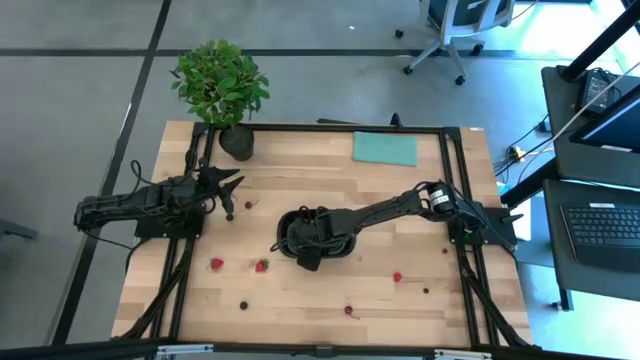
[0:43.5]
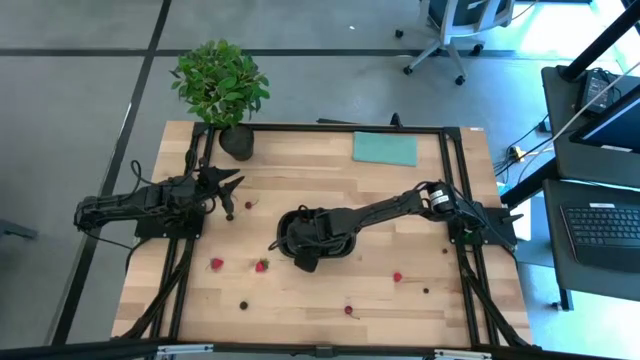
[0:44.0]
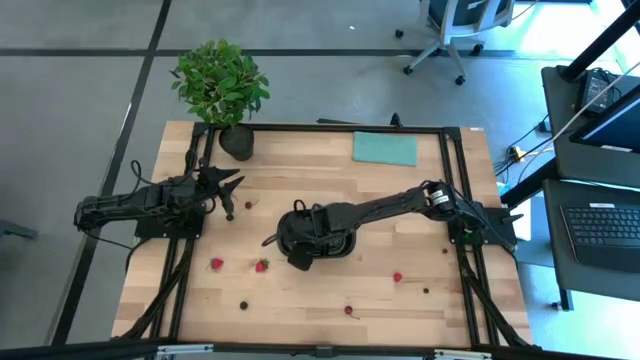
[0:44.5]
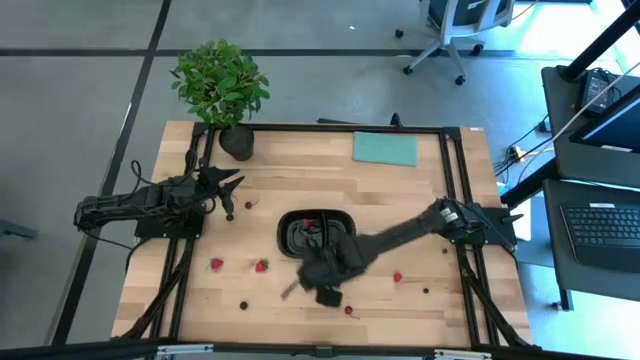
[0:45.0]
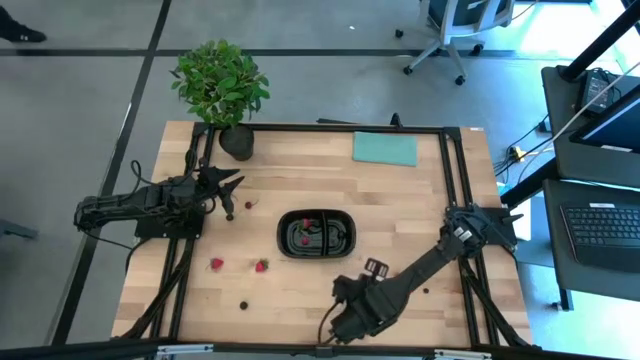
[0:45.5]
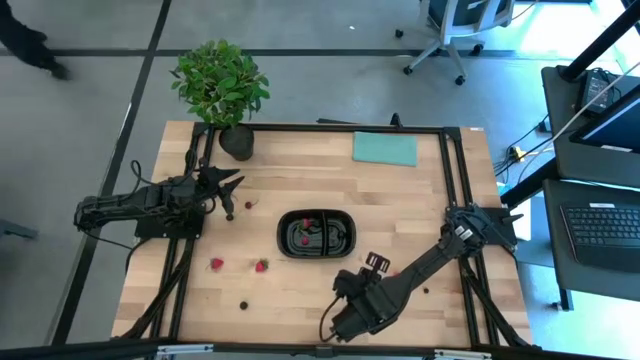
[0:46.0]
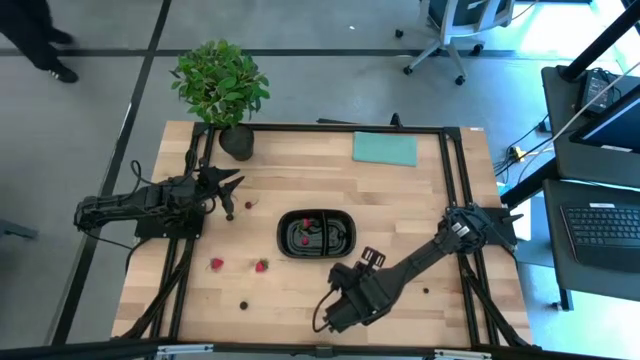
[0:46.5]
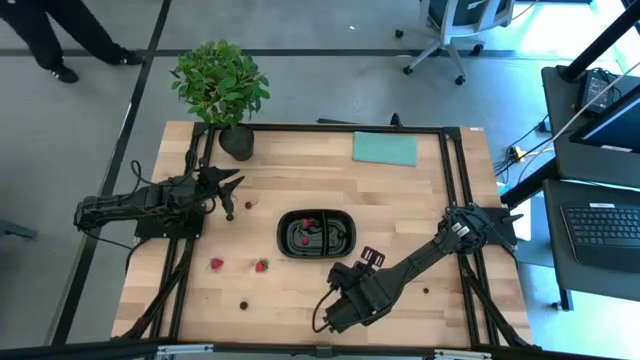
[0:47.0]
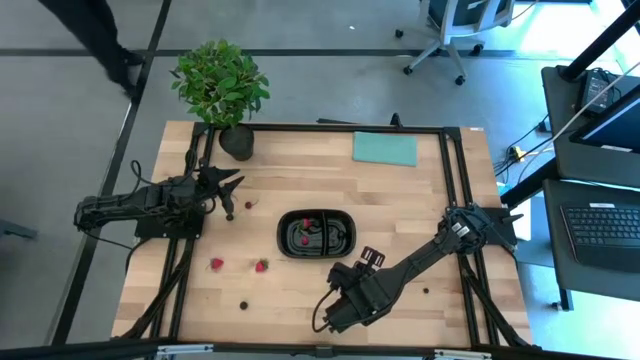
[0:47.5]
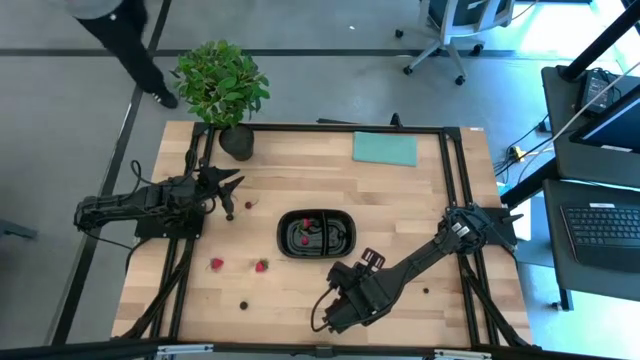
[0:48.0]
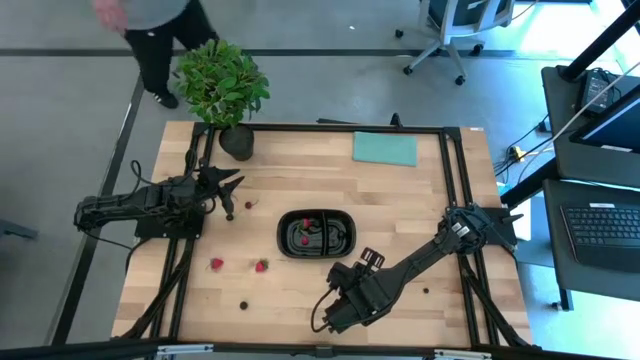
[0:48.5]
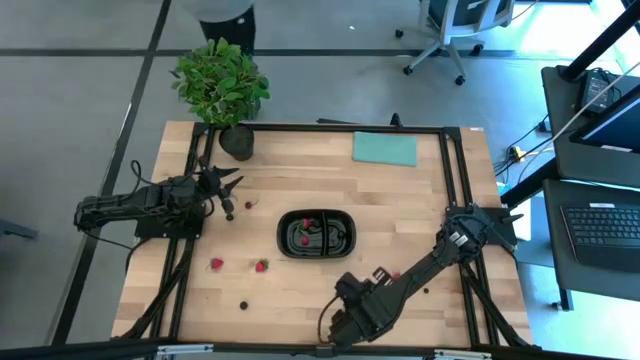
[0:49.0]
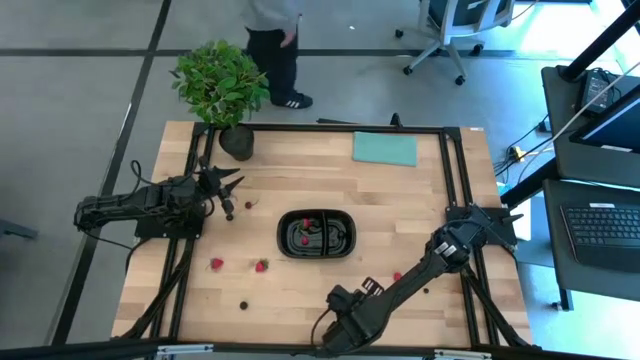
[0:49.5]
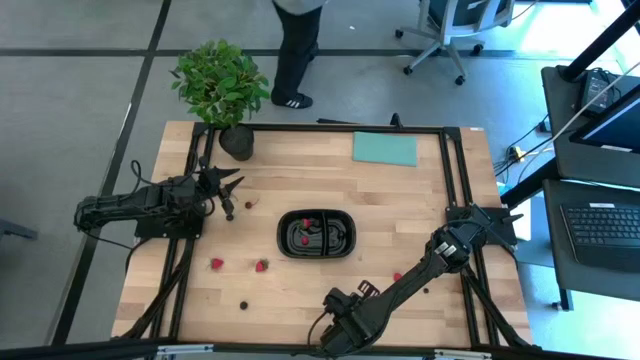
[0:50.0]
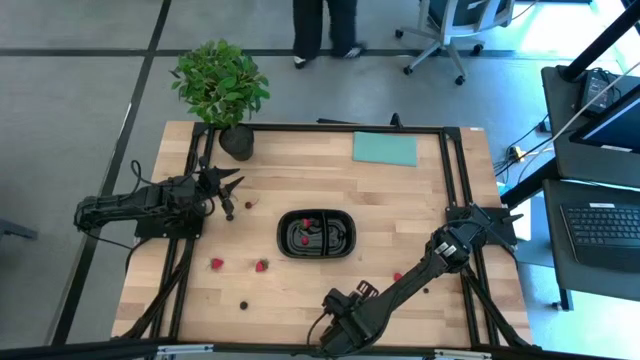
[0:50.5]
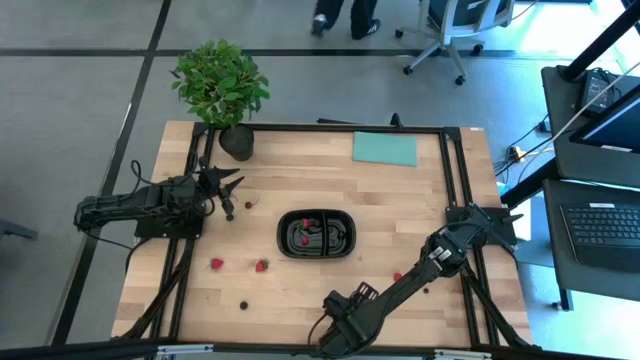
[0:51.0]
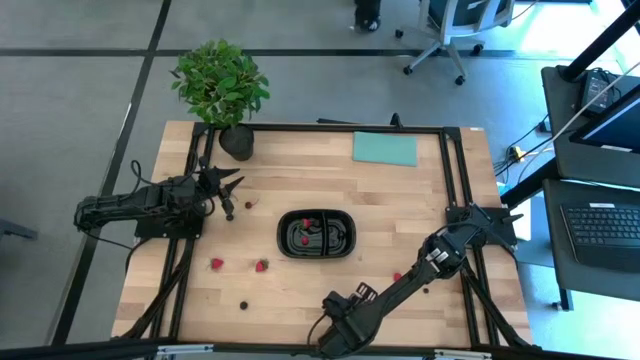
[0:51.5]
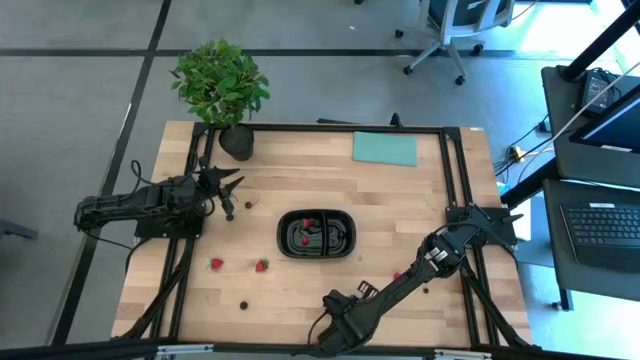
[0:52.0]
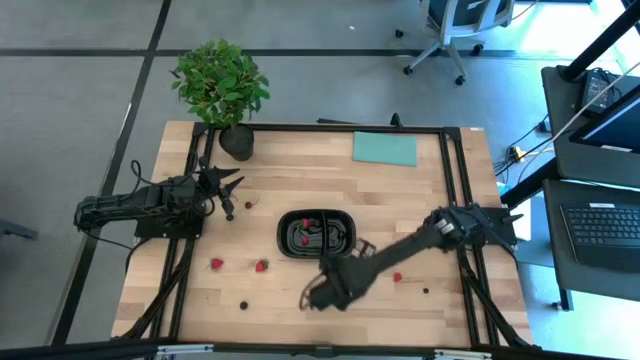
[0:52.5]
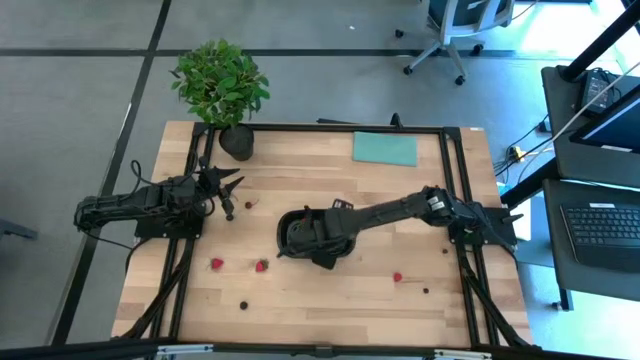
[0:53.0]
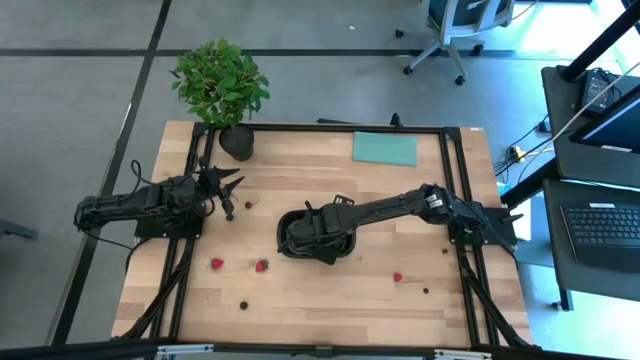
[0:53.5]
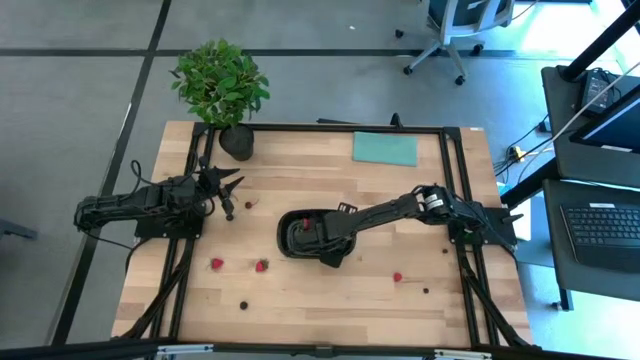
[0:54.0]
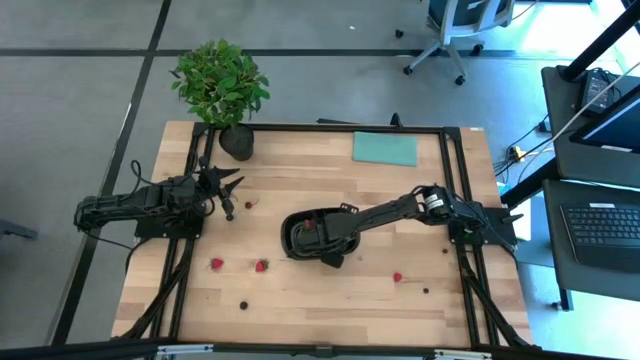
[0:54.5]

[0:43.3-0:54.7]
Task: Pick and placing Produce into tupperware
Put the bottom red cherry into the right section of the black bin

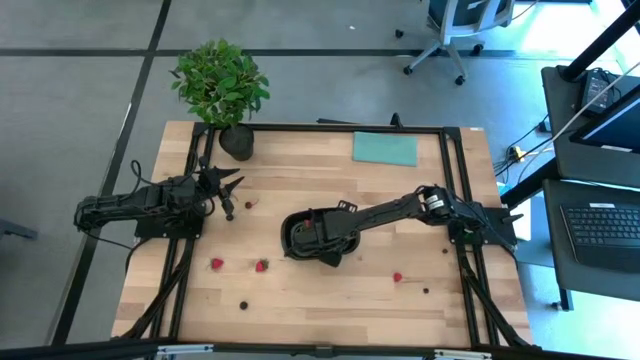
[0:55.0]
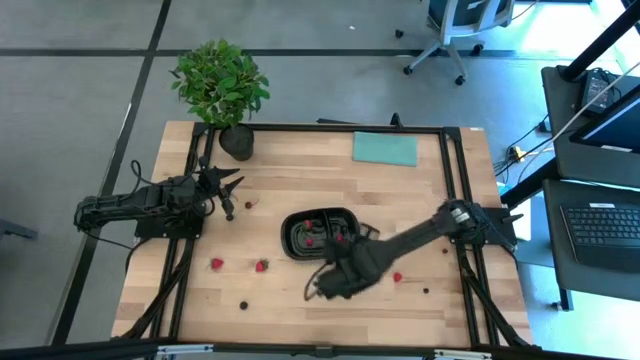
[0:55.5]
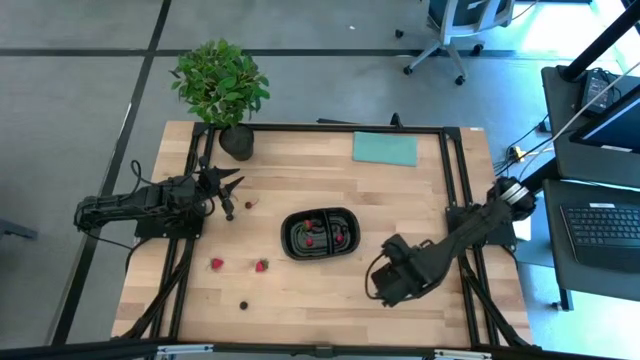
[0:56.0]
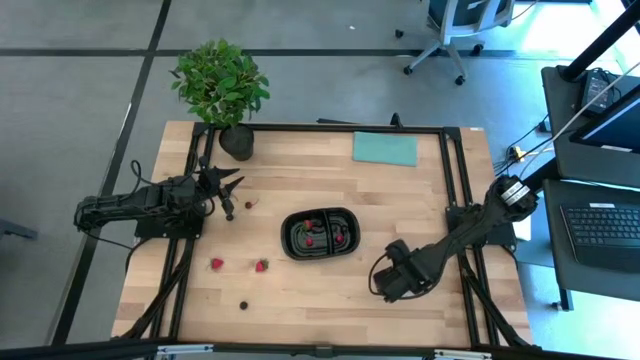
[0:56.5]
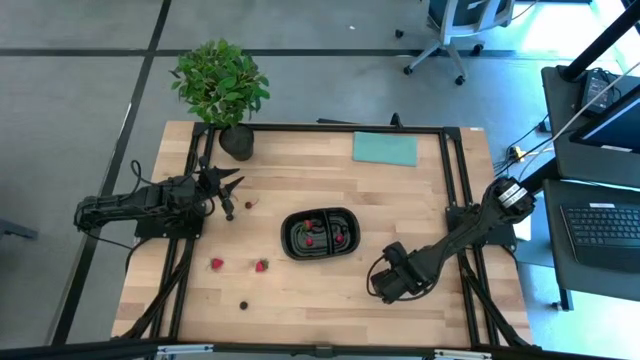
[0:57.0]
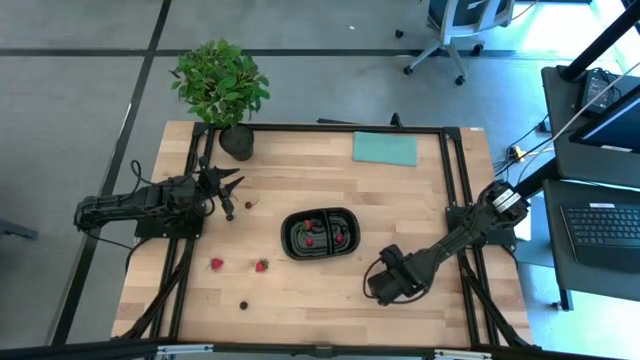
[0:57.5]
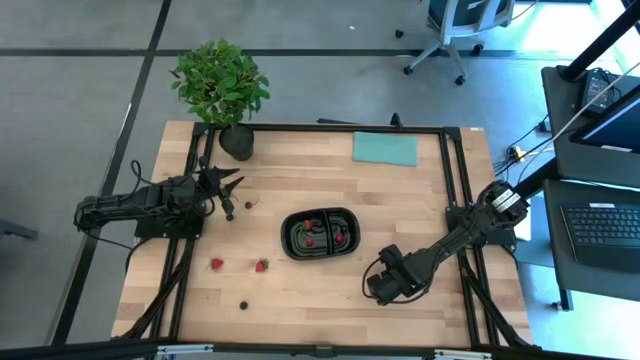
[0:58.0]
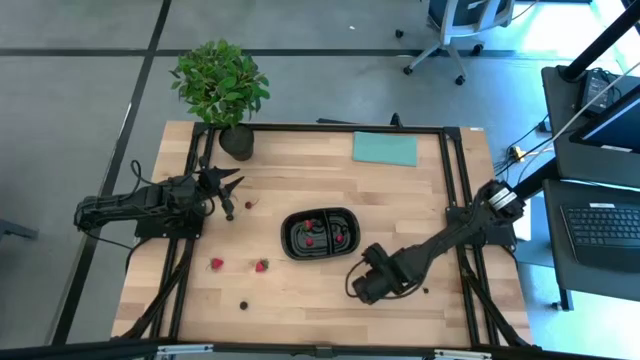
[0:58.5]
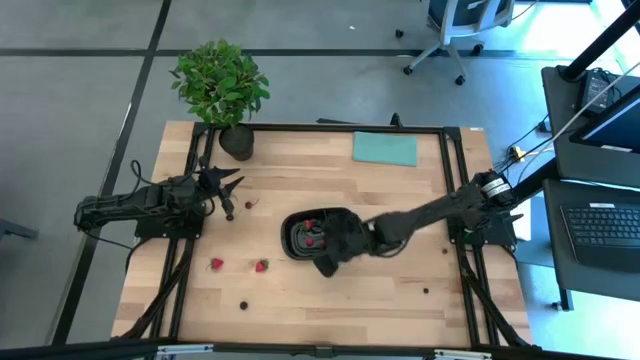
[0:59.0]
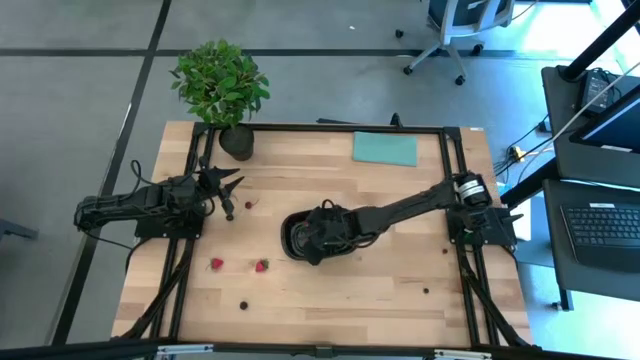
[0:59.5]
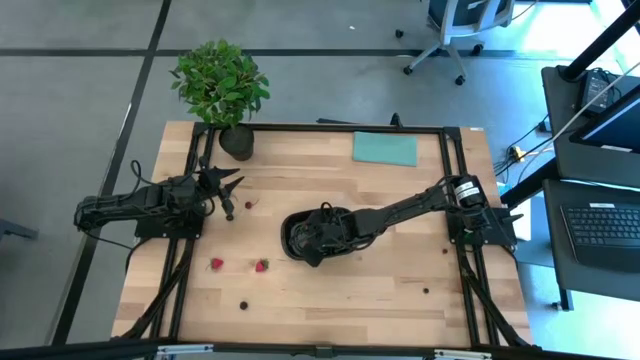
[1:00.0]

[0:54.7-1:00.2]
Put the red raspberry into the left section of the black bin

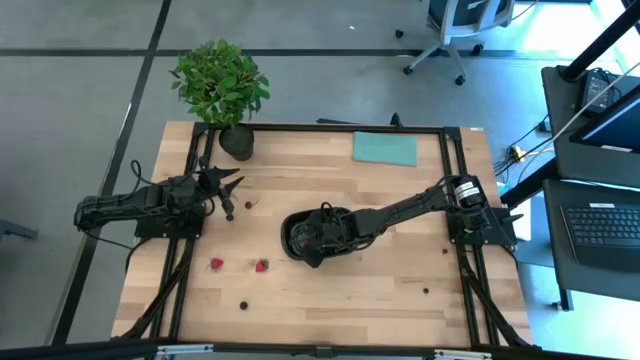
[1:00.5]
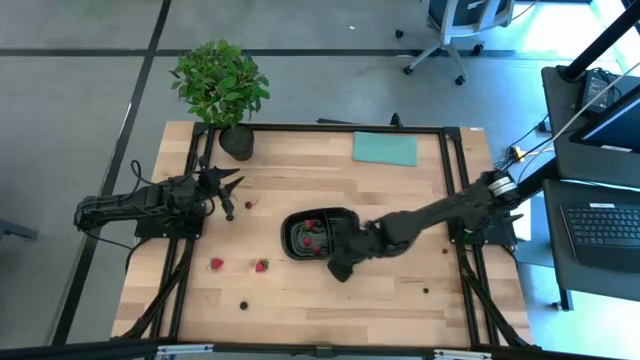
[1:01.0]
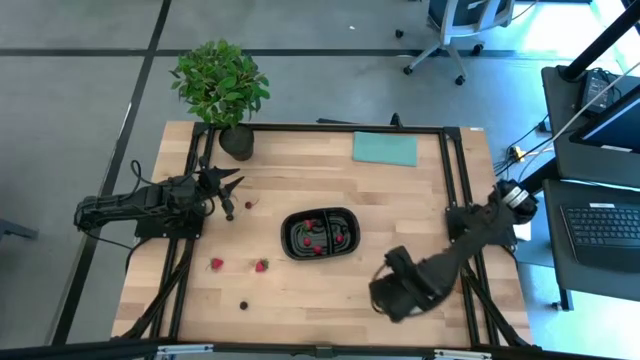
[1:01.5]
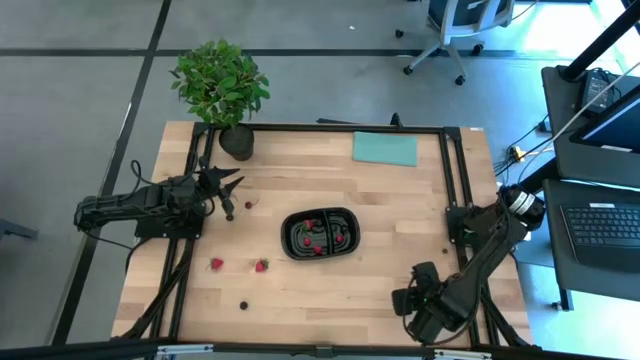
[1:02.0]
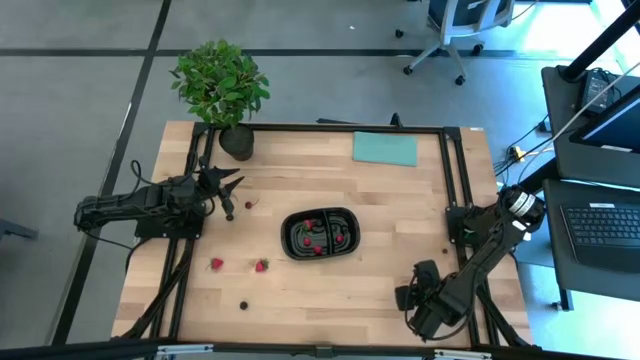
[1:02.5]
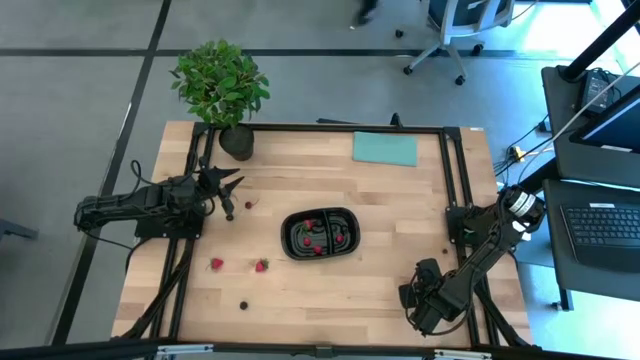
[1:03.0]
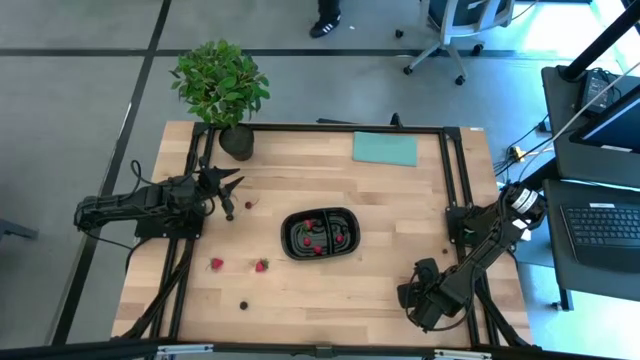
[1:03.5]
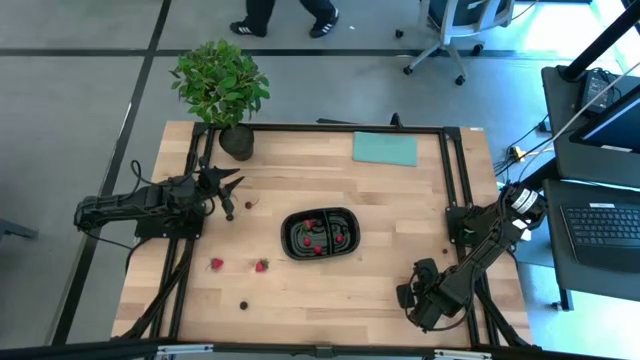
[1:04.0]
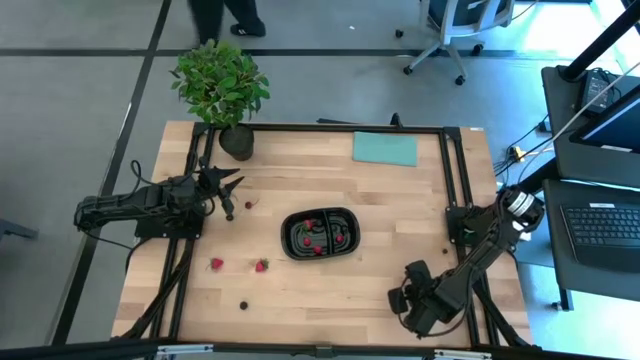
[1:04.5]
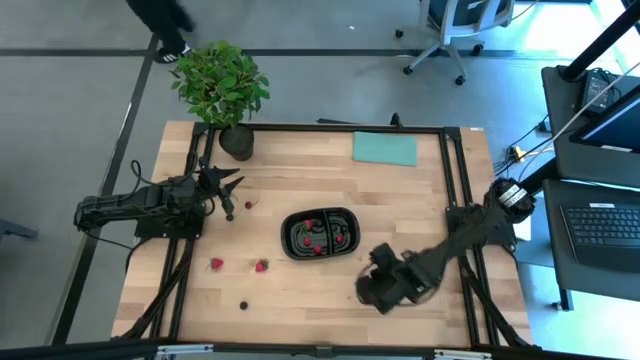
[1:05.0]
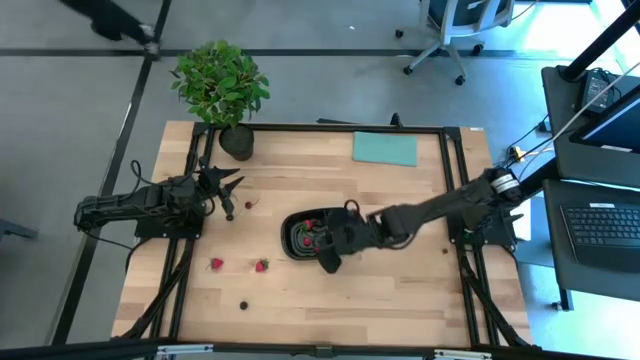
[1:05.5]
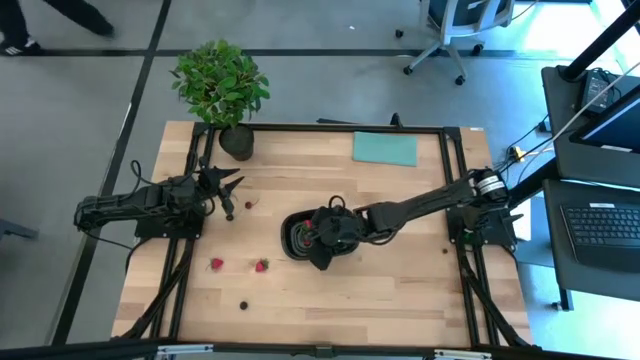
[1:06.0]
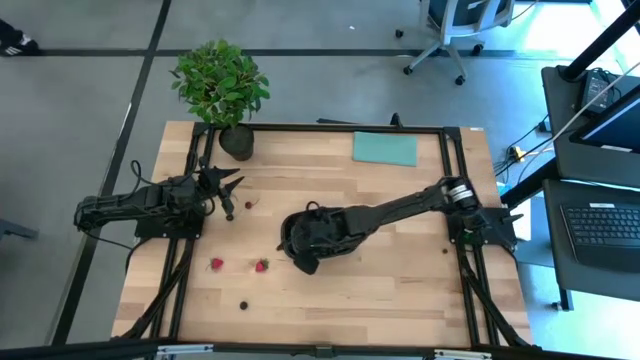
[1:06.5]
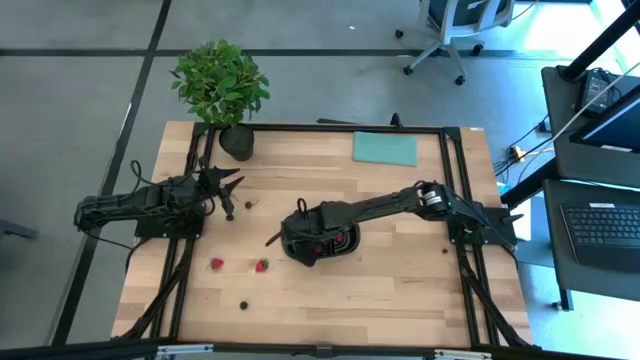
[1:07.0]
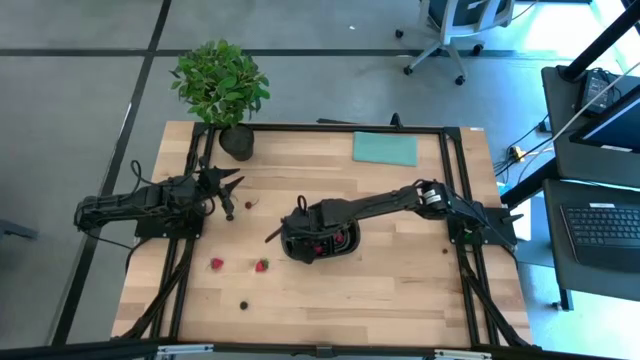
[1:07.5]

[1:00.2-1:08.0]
Put the bottom blueberry into the left section of the black bin
